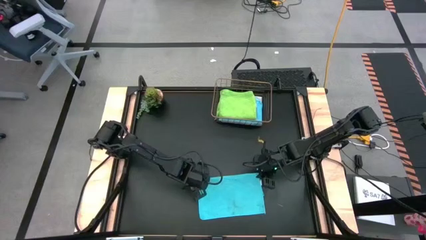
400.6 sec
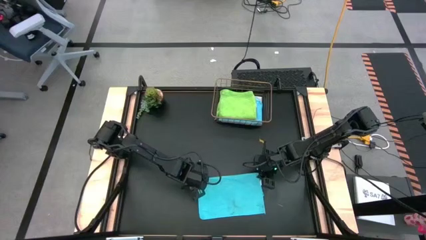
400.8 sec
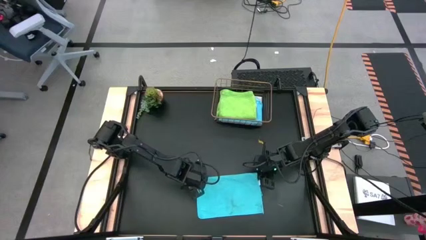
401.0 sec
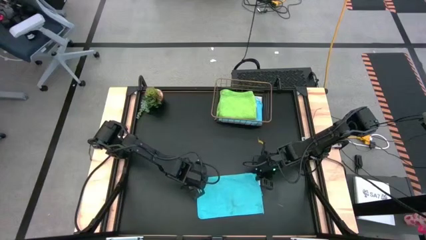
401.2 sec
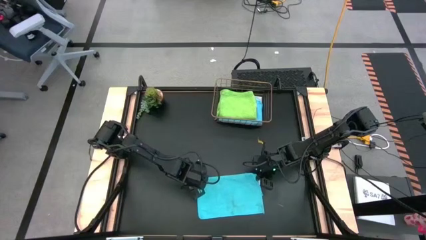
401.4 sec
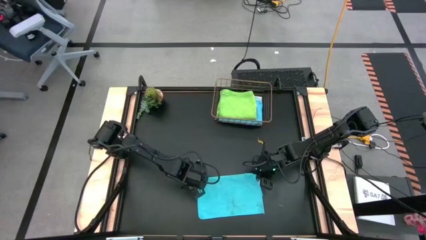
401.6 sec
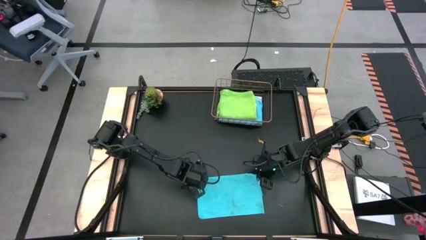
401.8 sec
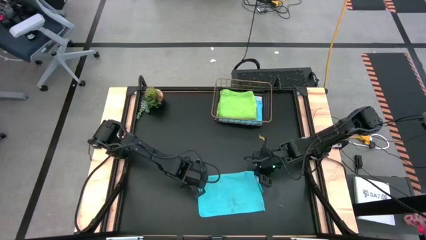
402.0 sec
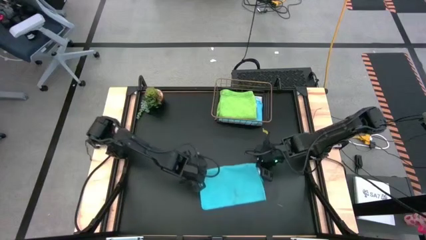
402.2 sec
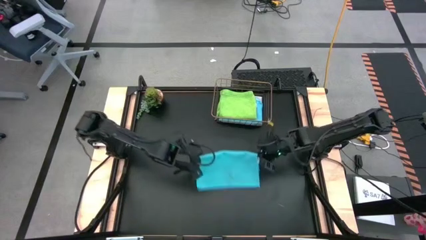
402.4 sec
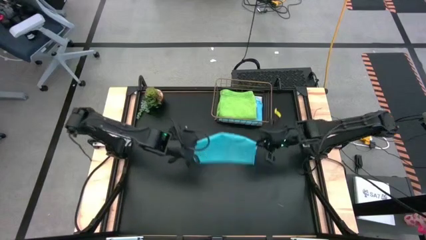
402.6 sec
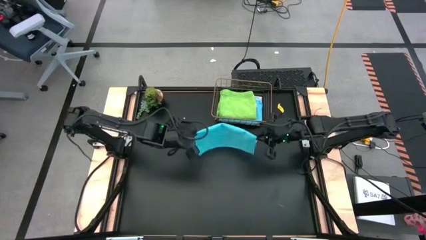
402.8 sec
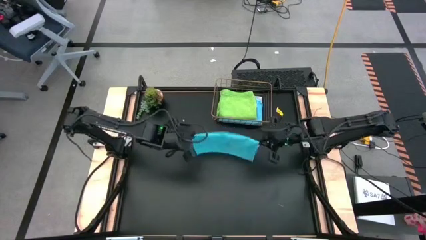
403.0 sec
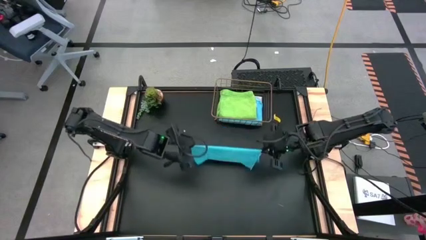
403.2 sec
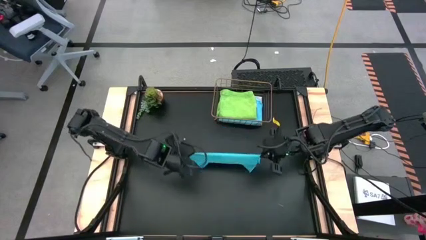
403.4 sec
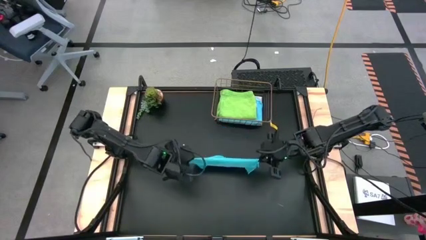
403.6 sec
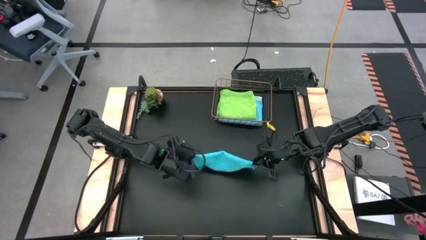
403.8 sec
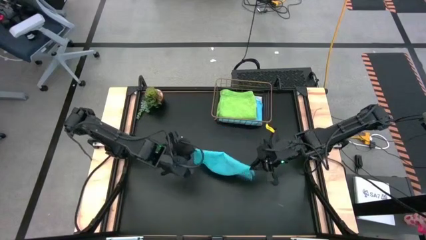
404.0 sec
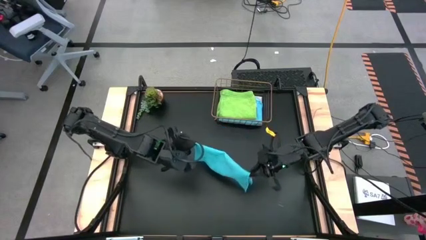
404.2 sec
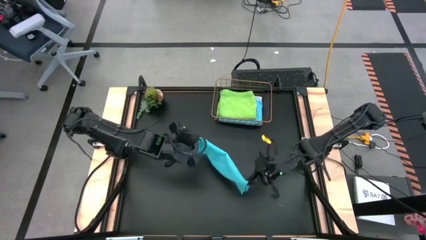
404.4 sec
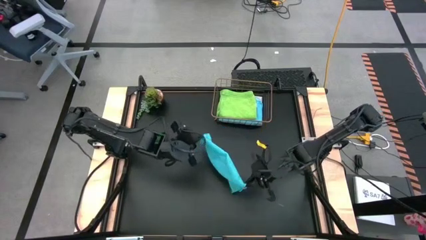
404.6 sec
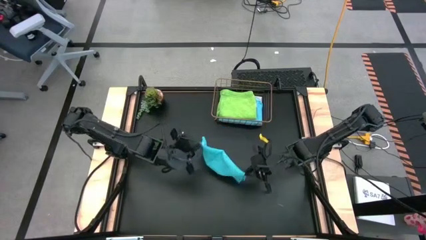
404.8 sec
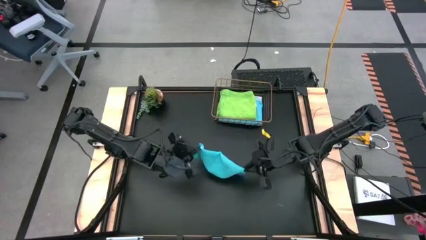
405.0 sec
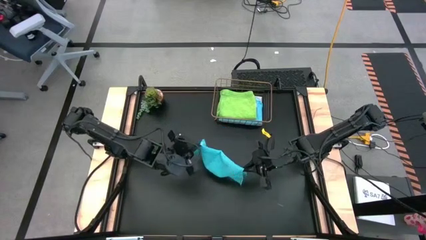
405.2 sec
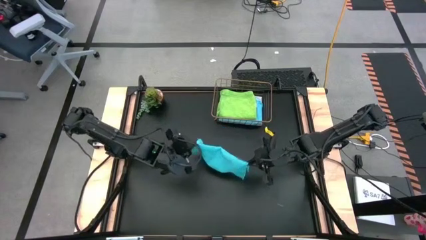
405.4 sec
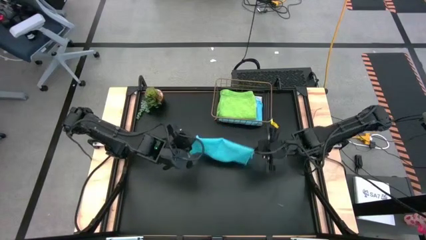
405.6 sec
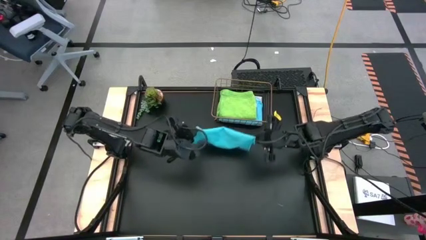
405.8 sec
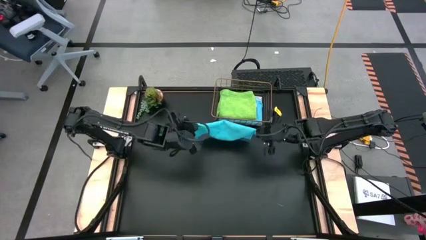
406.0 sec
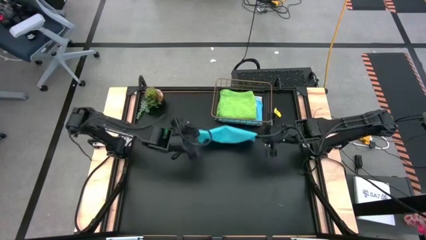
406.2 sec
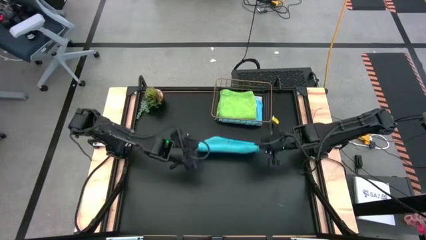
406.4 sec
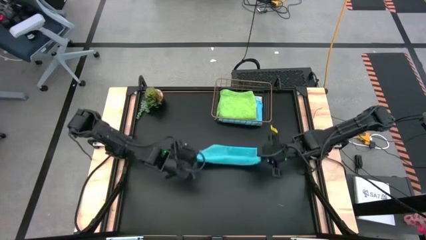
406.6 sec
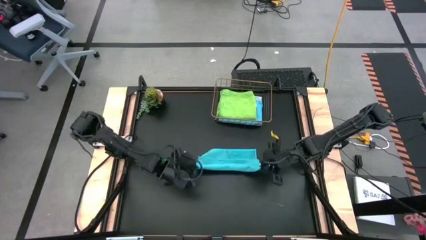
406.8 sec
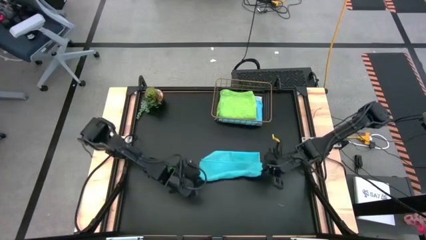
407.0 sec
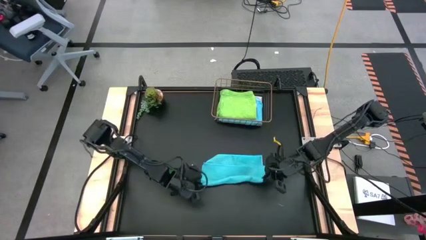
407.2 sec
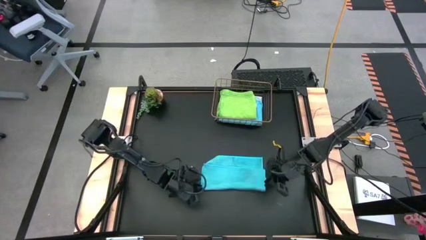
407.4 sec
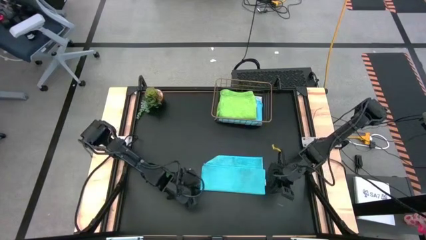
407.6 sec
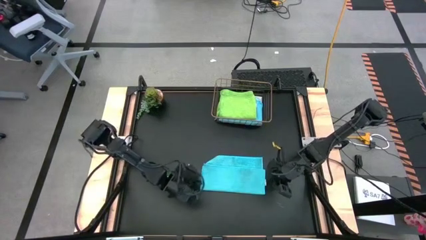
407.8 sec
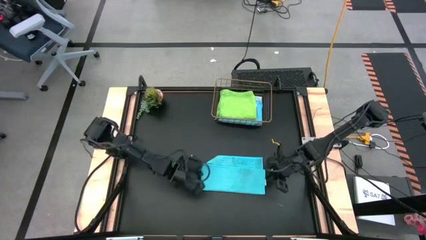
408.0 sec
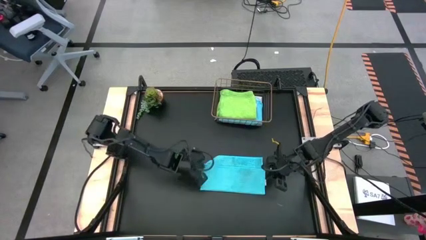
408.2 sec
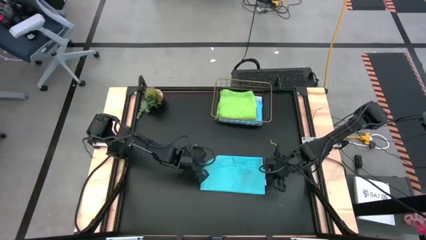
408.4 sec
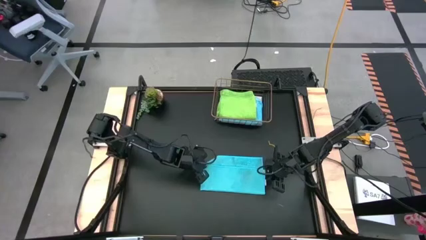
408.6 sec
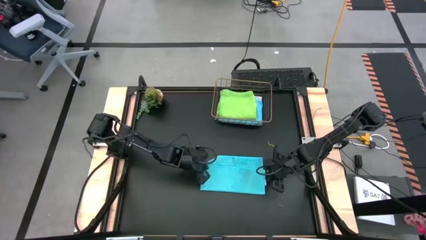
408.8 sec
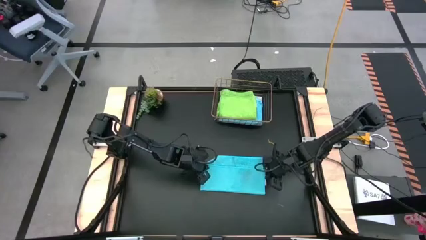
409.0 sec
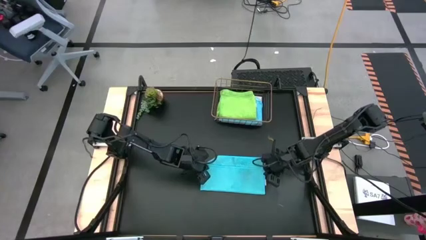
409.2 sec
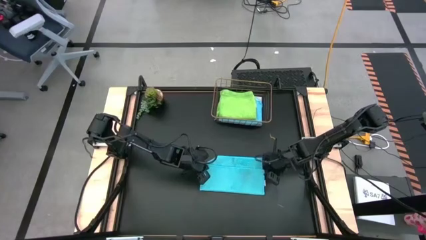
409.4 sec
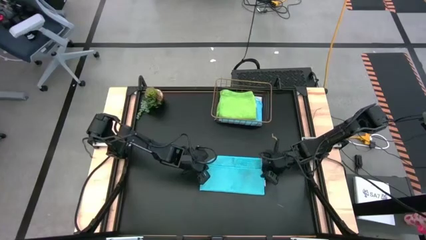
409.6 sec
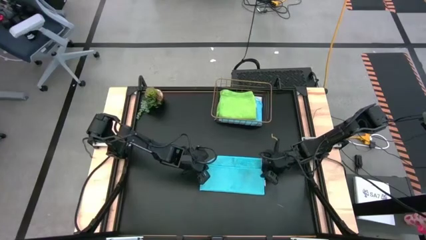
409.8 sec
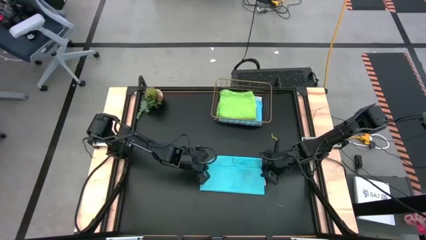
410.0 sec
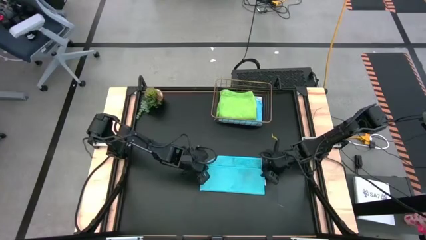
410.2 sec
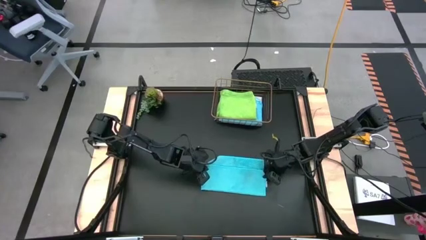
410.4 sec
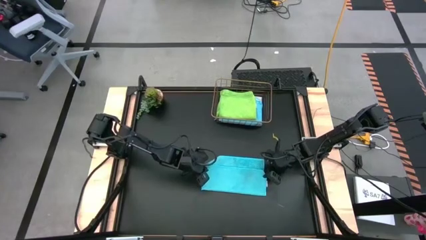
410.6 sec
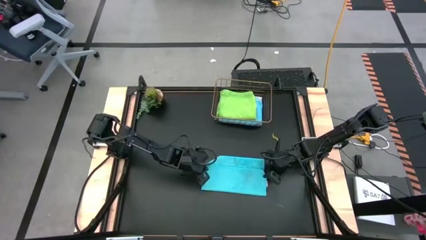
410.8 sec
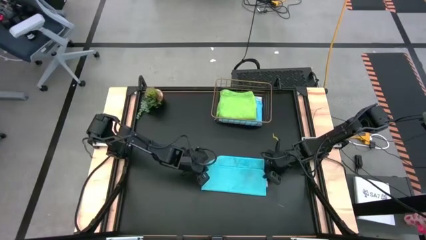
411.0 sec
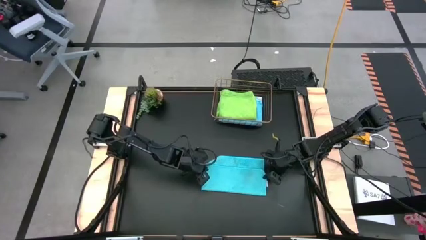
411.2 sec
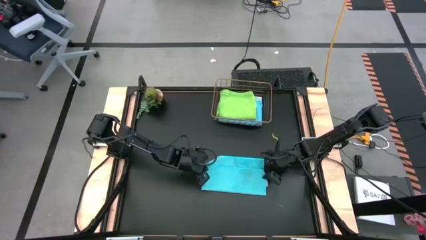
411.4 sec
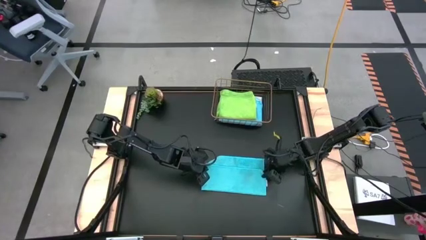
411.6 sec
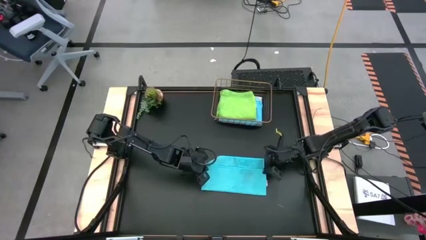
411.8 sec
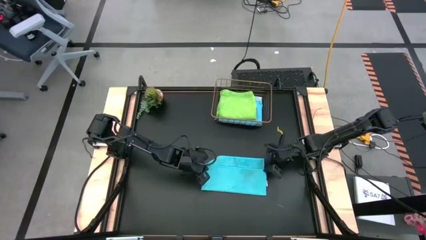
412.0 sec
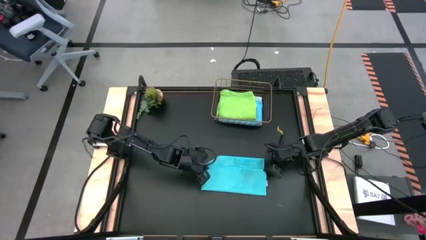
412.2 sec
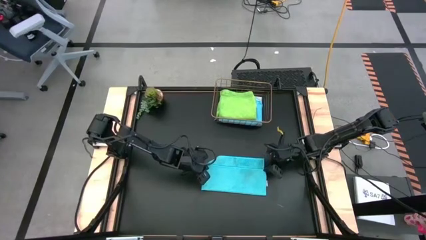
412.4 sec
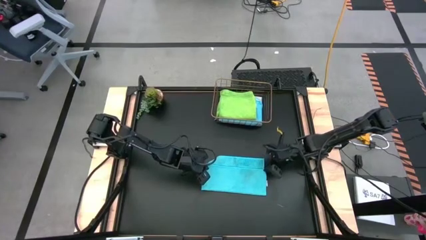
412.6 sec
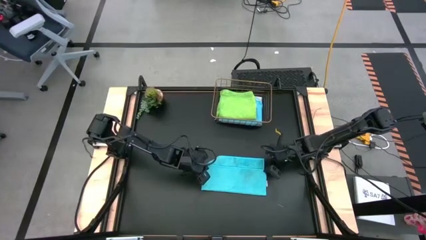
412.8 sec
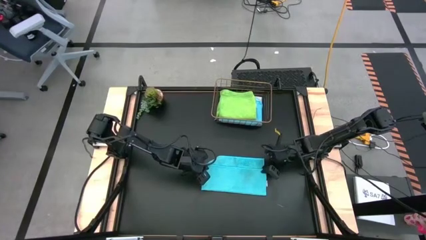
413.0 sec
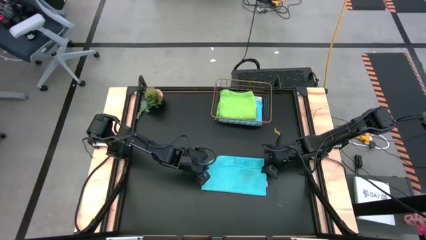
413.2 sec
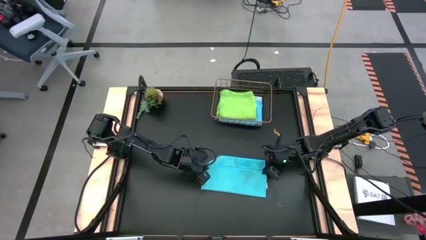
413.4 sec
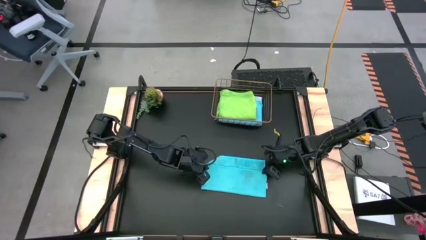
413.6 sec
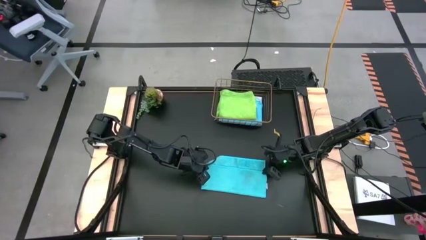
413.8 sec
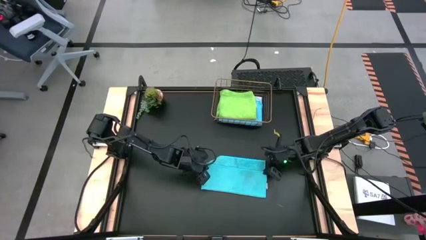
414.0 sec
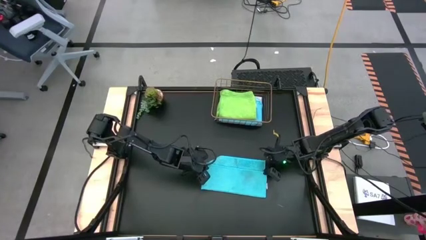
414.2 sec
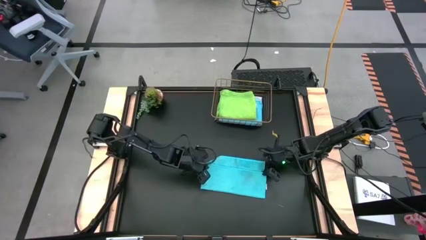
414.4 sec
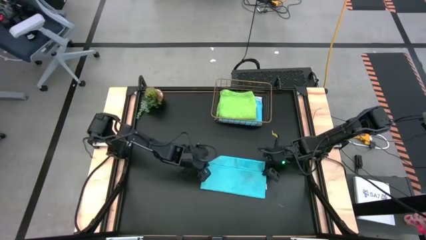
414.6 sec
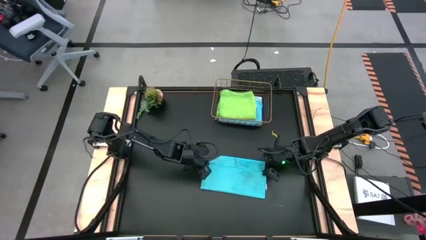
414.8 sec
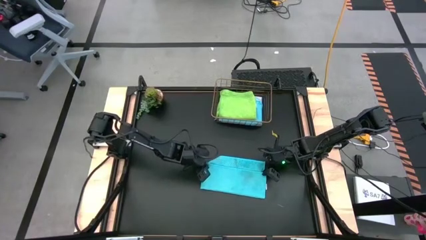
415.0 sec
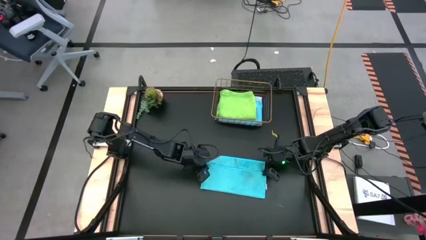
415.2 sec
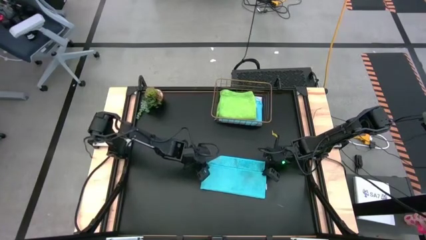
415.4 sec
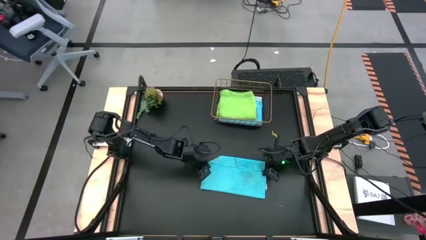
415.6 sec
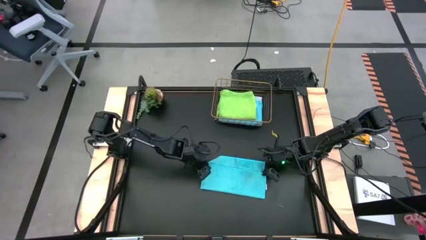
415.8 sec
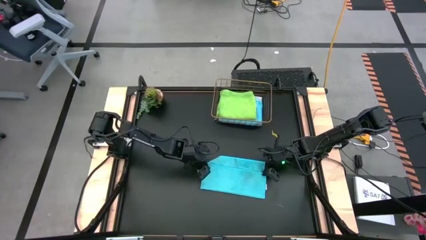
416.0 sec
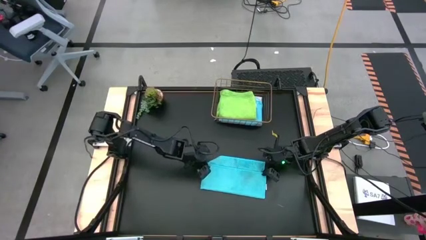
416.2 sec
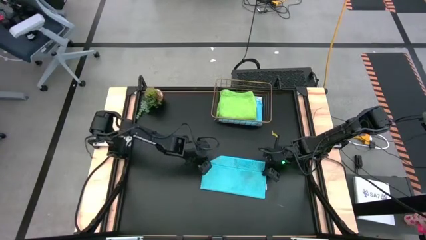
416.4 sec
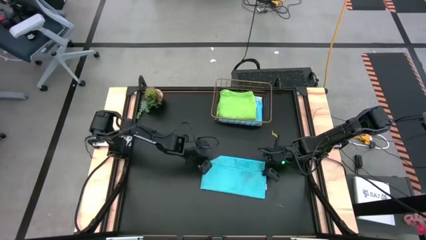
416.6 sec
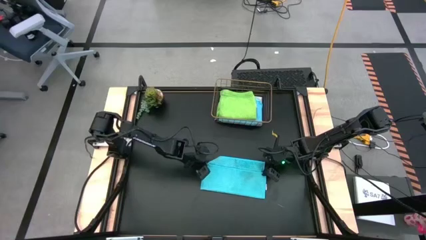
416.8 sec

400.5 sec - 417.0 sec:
Task: Fold microfiber towels
Fold the blue towel
